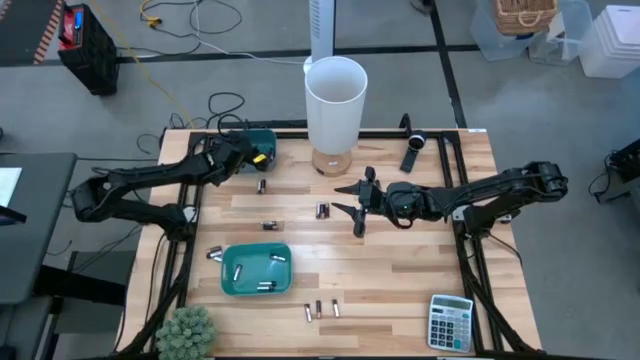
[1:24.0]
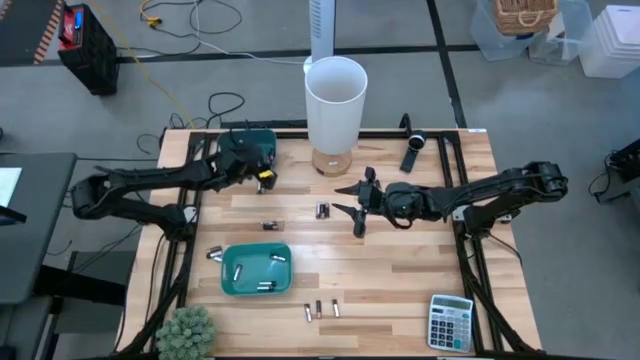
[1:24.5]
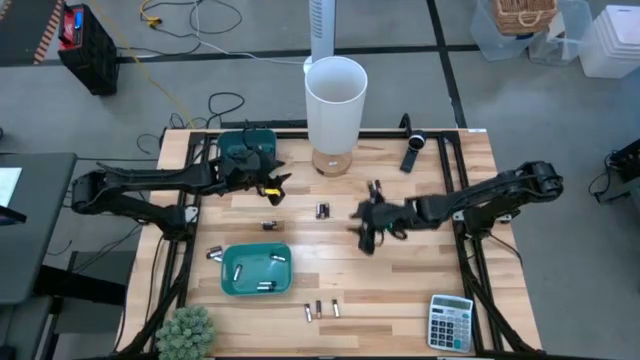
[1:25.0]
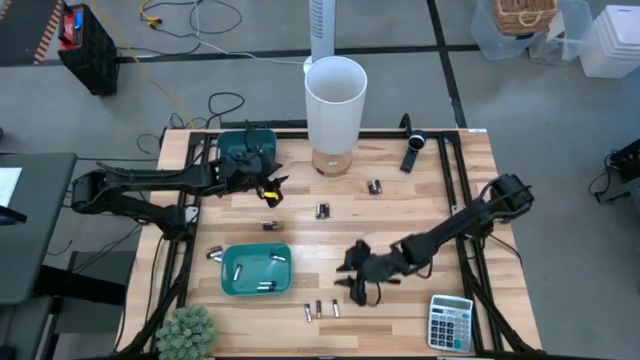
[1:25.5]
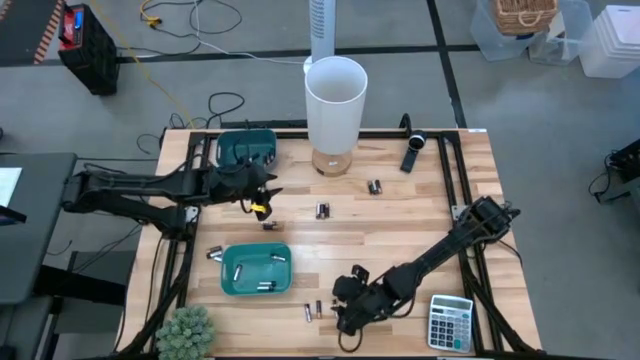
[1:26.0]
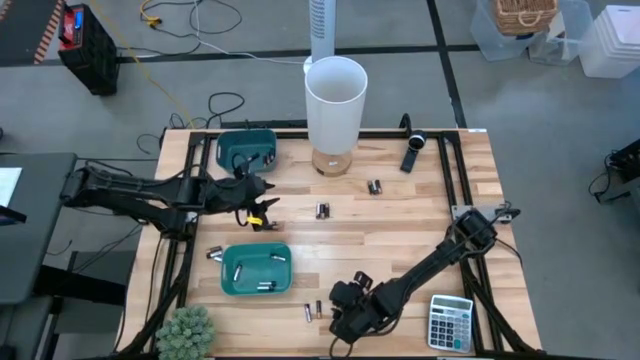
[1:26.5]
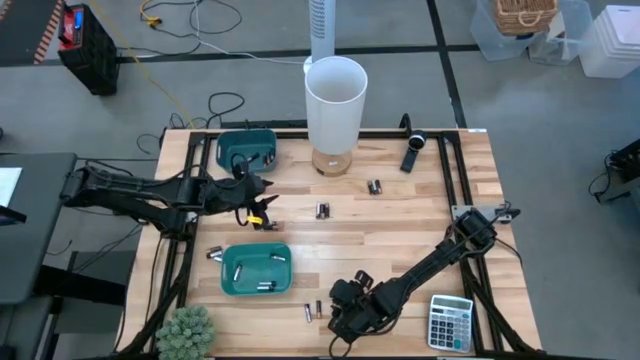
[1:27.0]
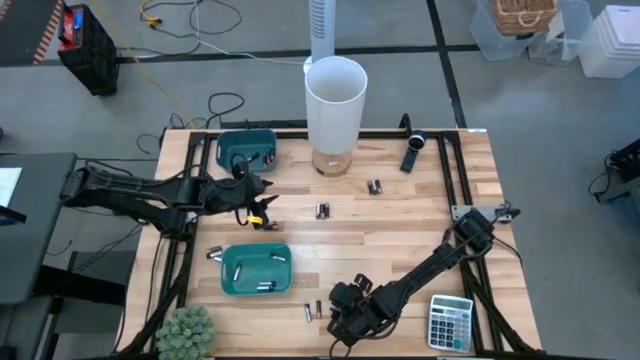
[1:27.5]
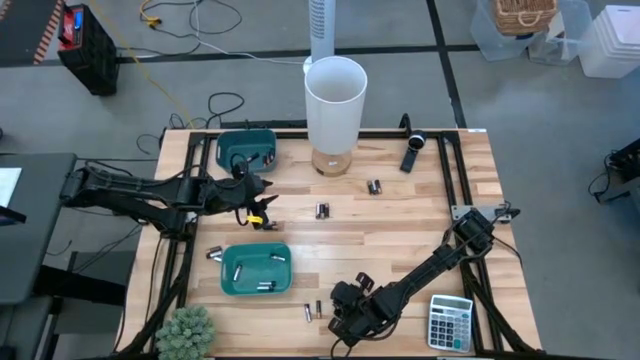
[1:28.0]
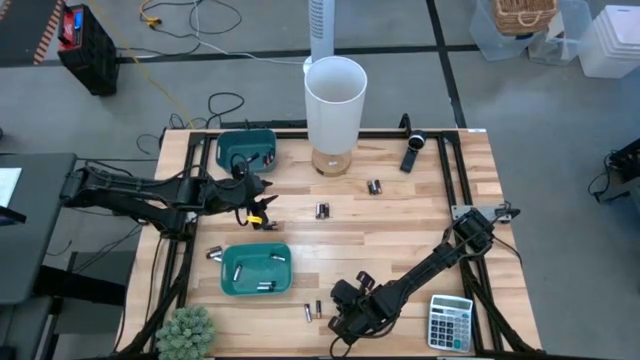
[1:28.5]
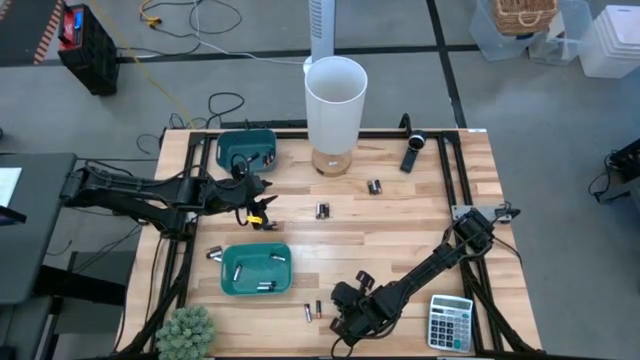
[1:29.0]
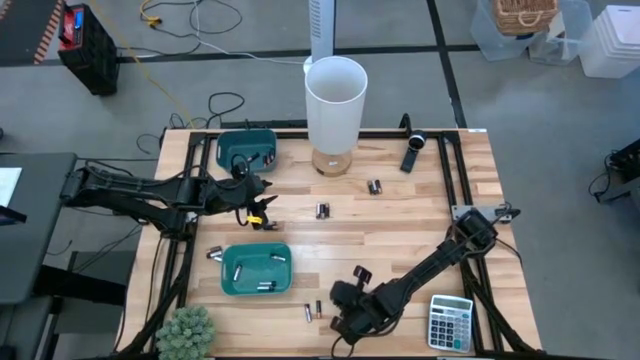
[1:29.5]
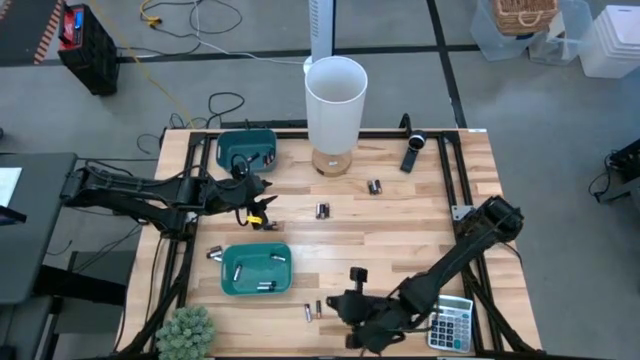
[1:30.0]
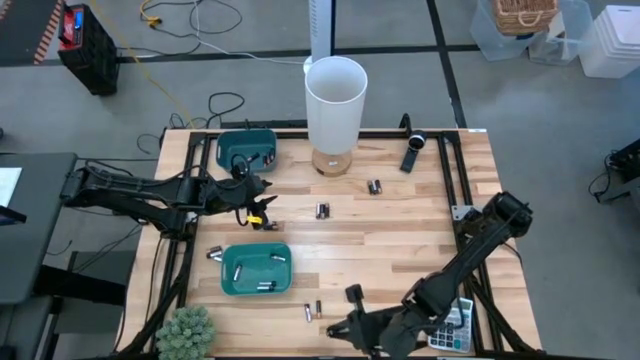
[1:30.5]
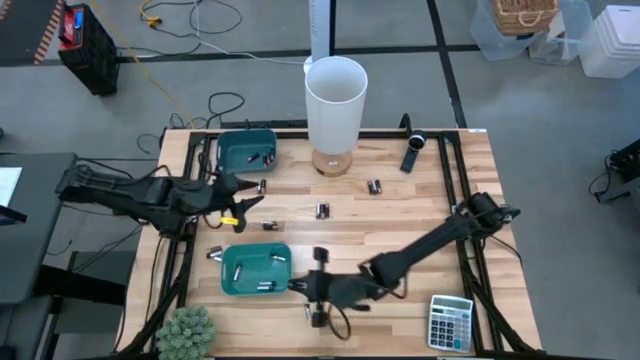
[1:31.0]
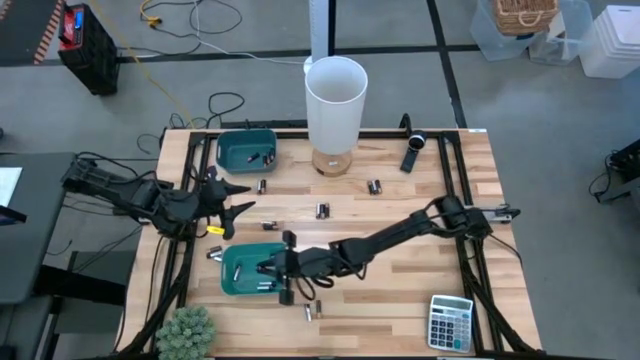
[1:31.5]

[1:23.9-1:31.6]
Task: Sort batteries
Put the silver battery into the green bin

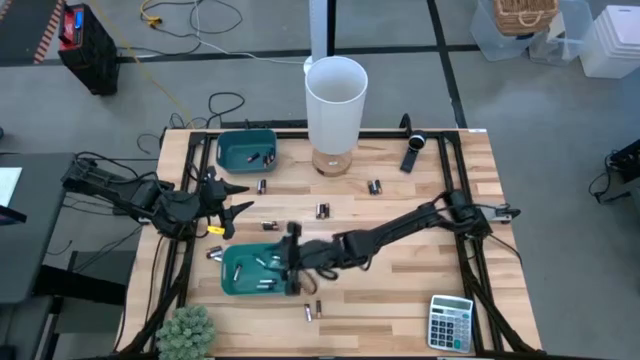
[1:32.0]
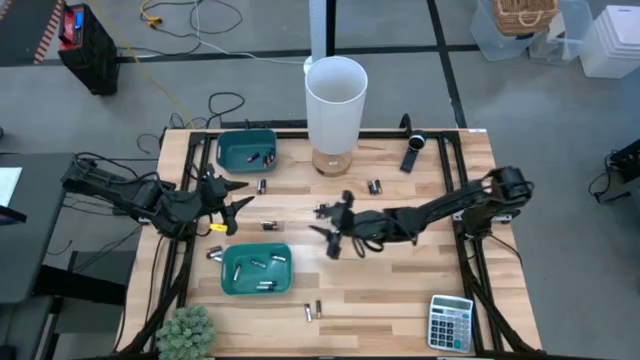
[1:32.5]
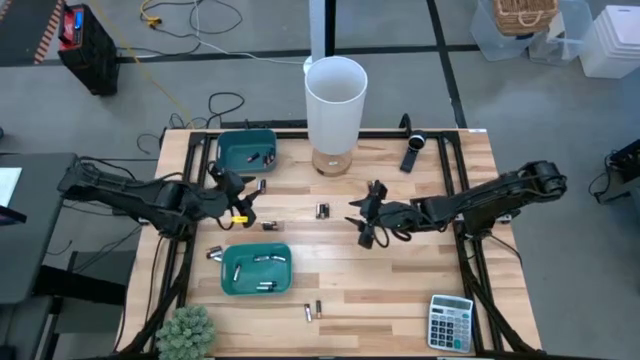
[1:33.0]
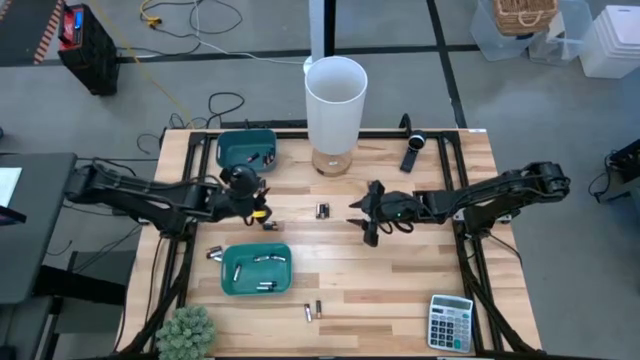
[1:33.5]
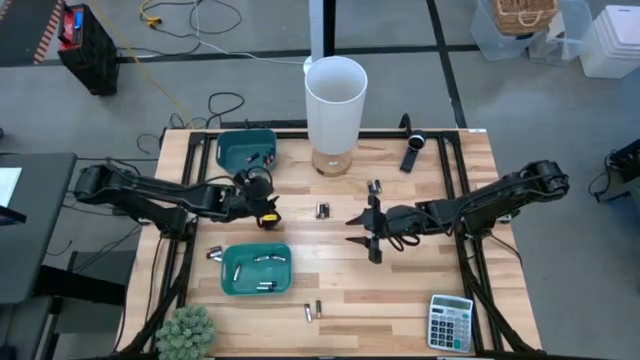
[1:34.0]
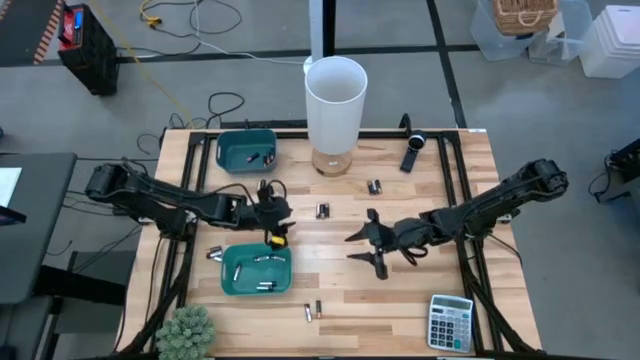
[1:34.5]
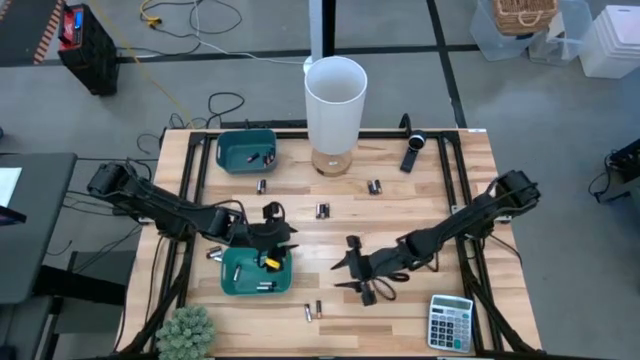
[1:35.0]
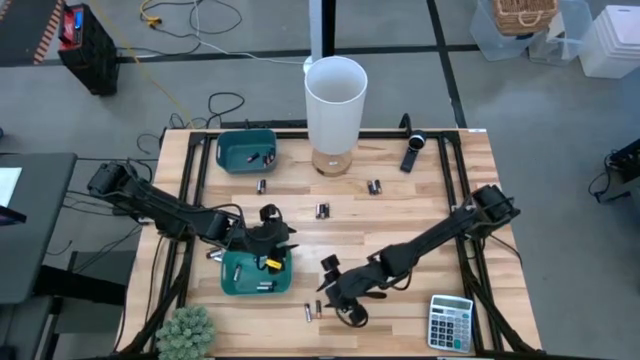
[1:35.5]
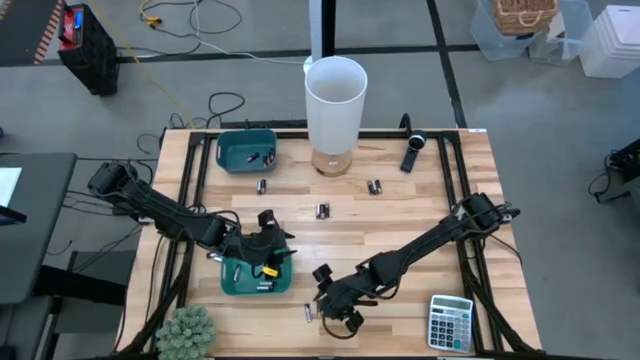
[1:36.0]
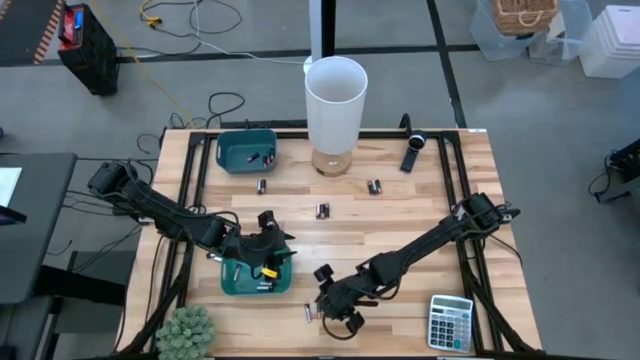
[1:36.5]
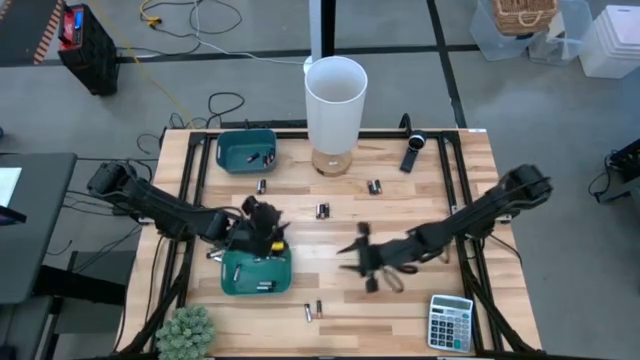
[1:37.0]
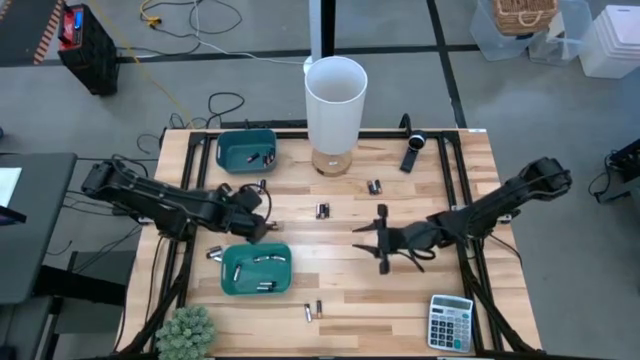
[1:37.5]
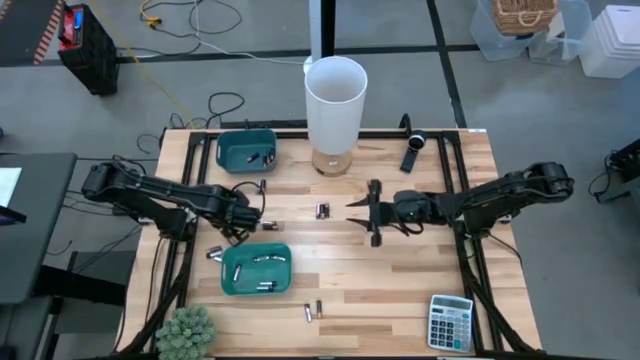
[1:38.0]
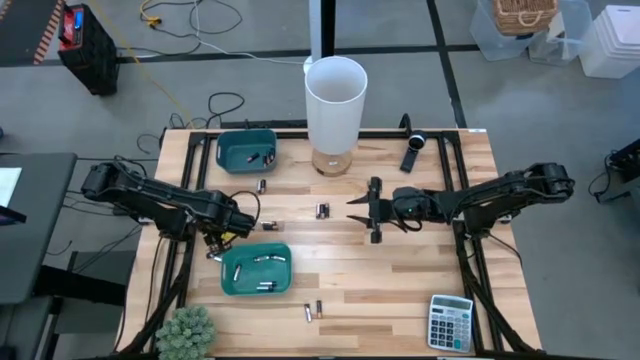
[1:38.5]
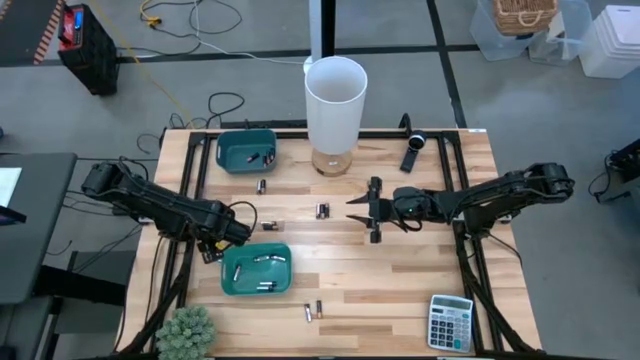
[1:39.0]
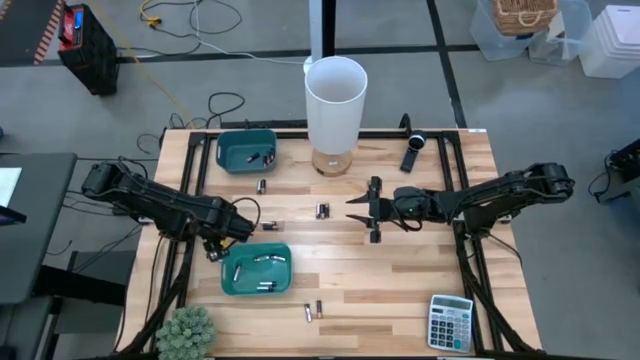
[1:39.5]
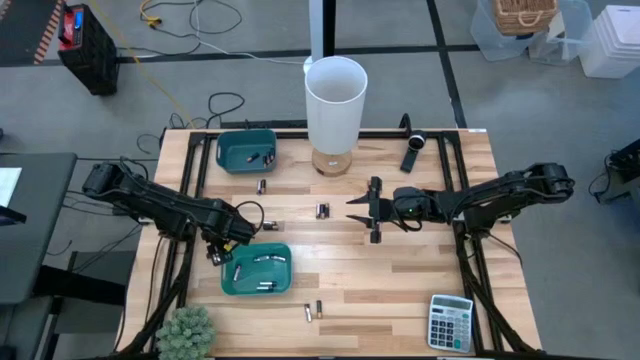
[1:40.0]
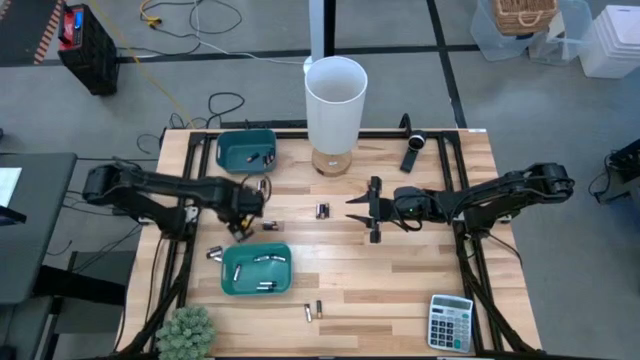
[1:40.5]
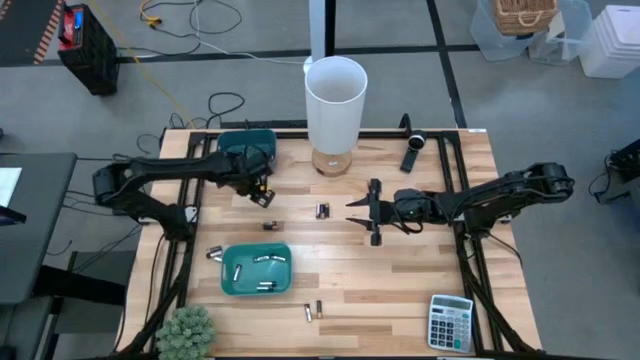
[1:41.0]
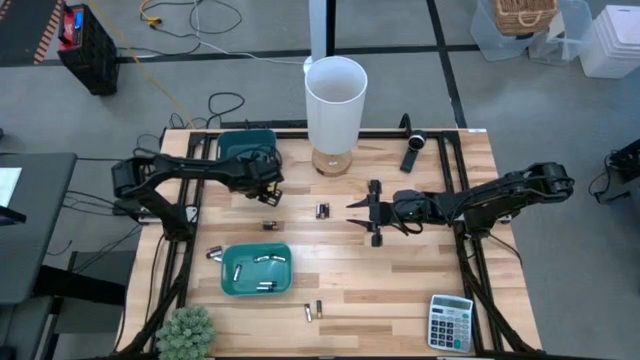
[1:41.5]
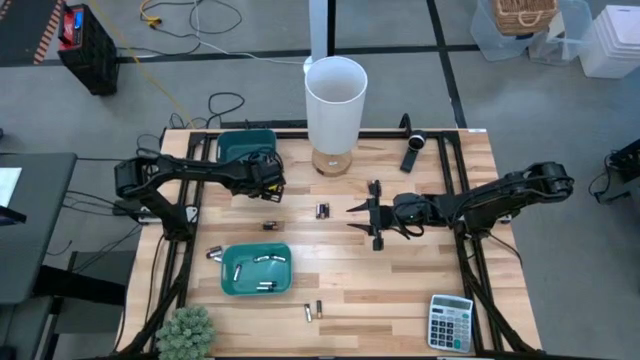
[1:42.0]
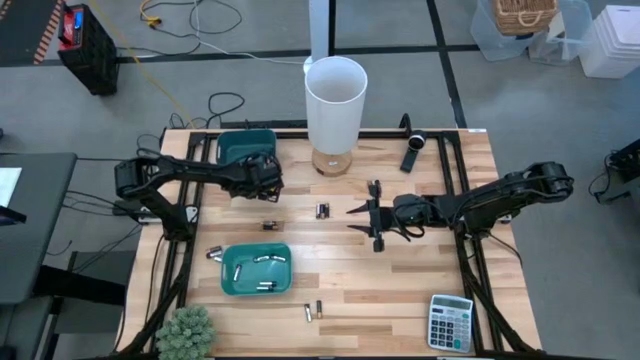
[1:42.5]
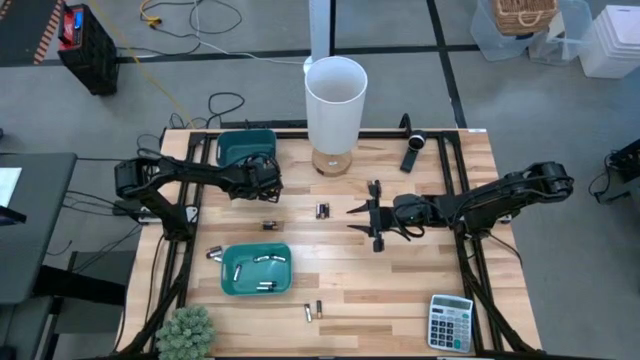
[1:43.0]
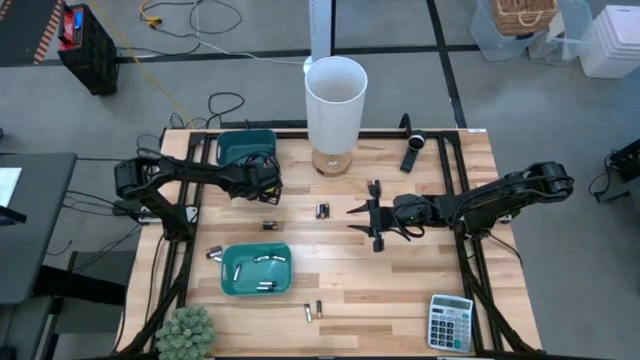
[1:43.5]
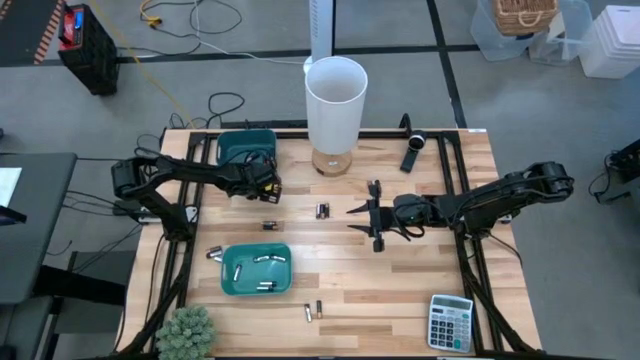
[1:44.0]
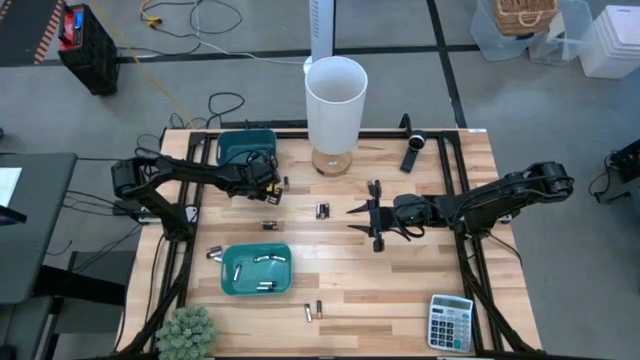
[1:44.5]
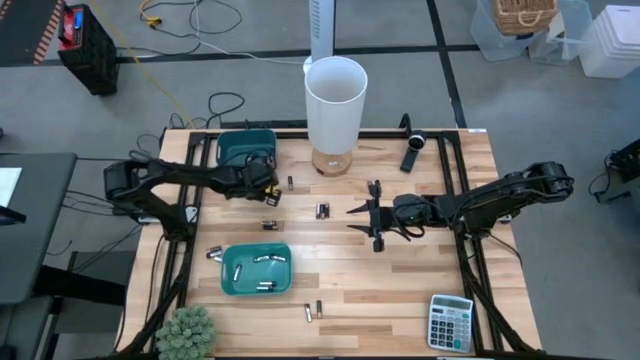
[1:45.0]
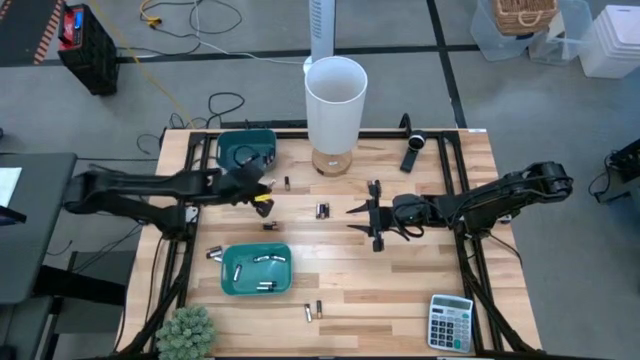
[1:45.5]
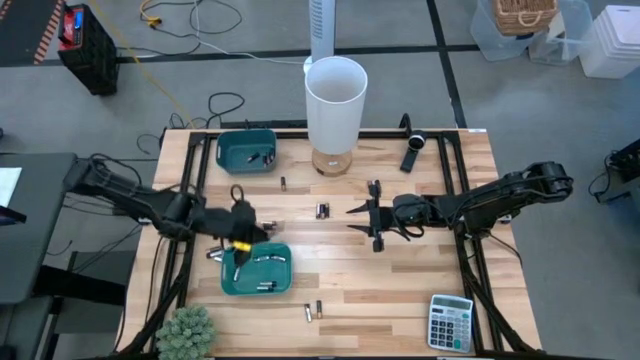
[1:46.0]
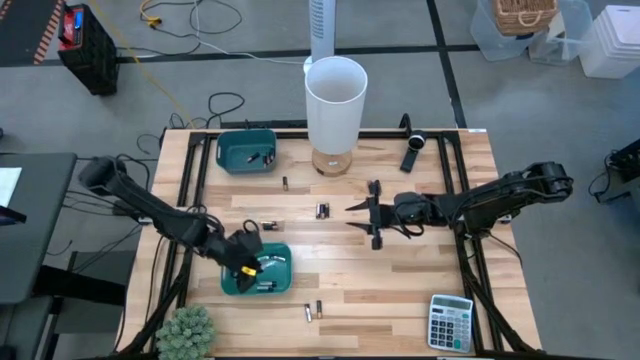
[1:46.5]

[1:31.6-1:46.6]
Put the silver battery into the green bin
